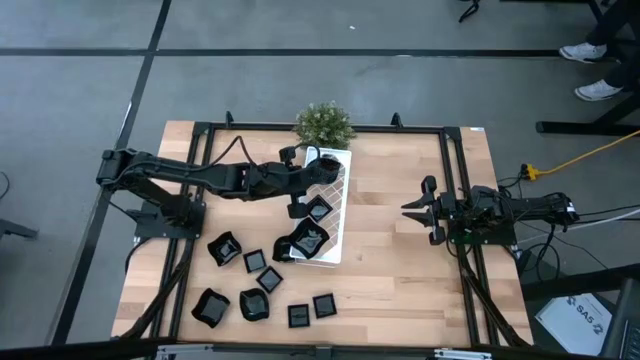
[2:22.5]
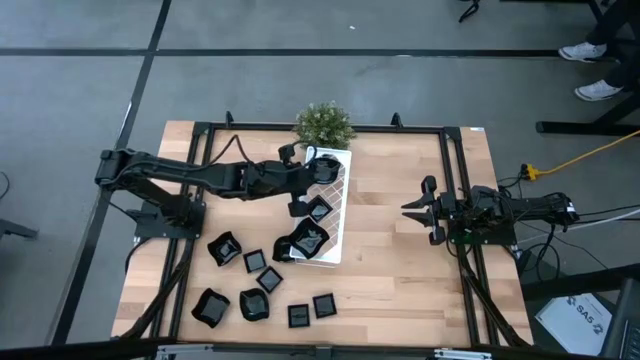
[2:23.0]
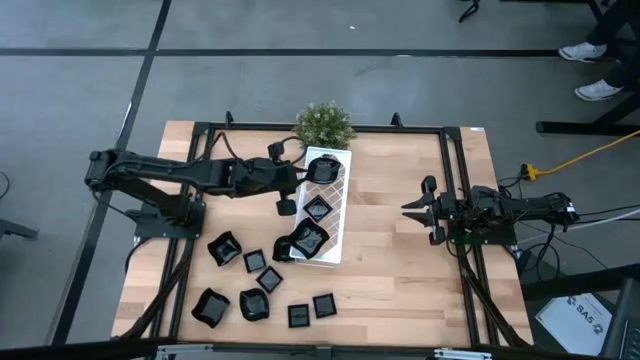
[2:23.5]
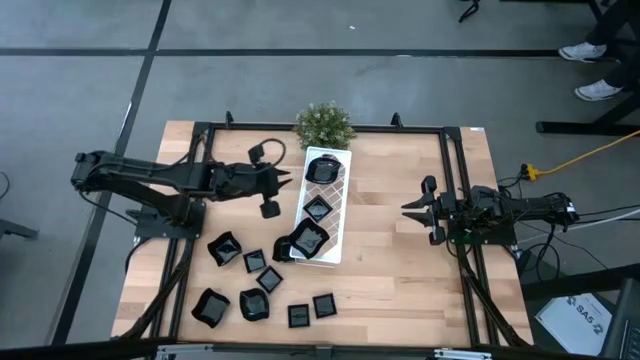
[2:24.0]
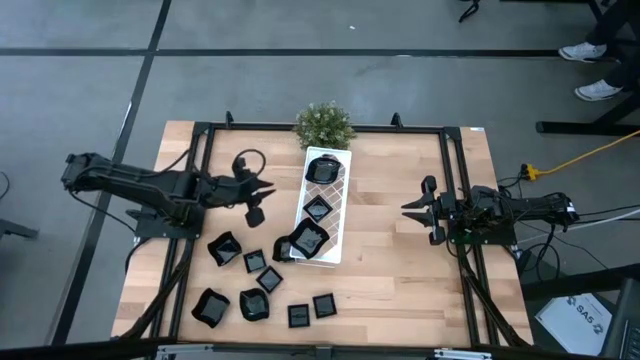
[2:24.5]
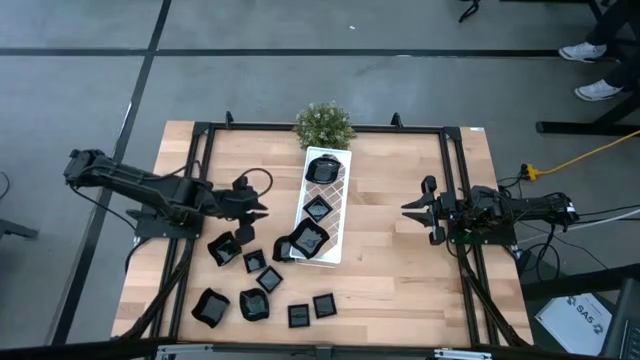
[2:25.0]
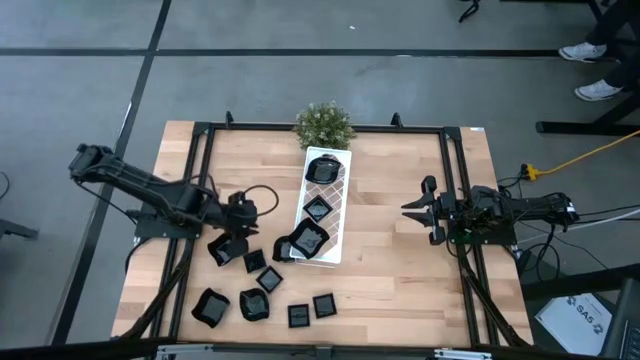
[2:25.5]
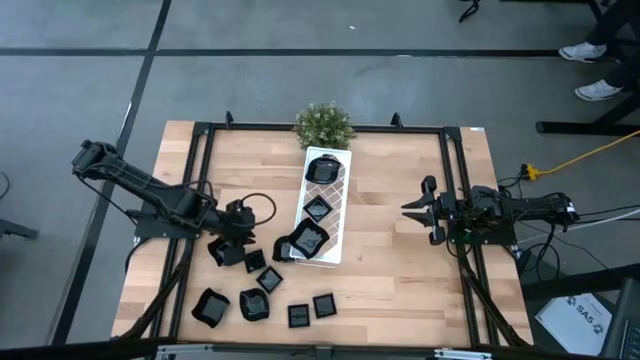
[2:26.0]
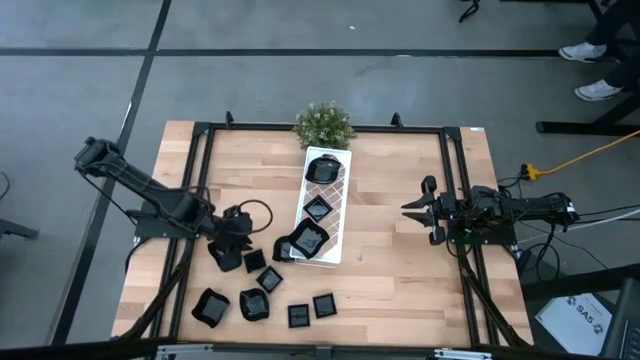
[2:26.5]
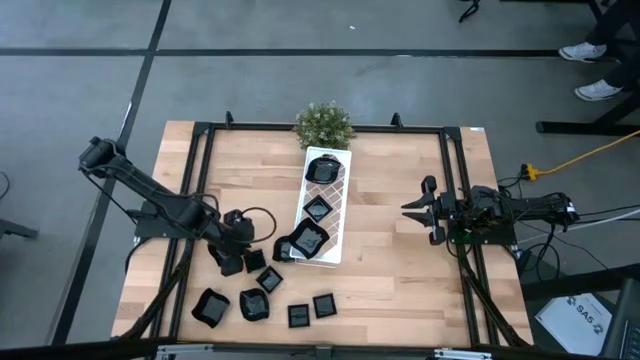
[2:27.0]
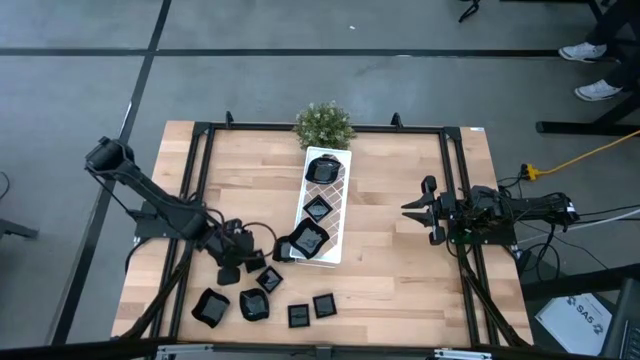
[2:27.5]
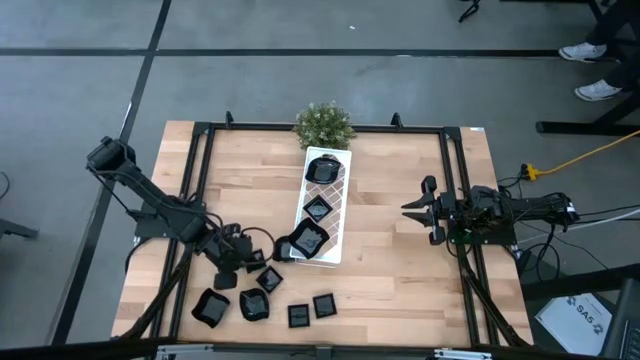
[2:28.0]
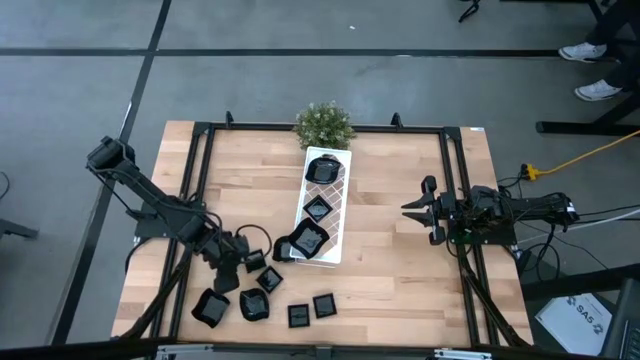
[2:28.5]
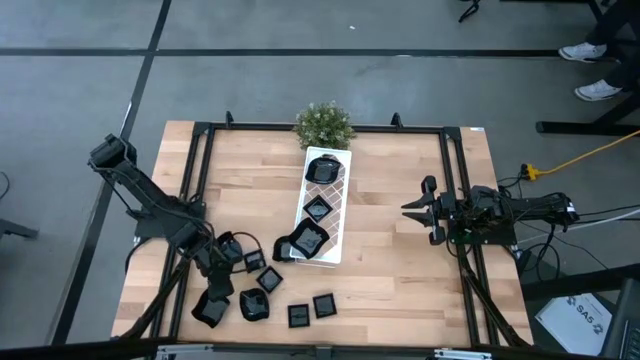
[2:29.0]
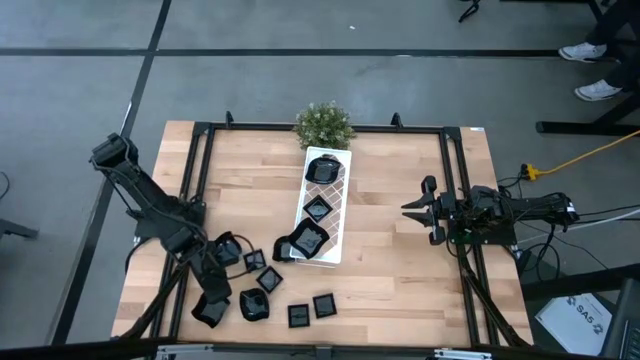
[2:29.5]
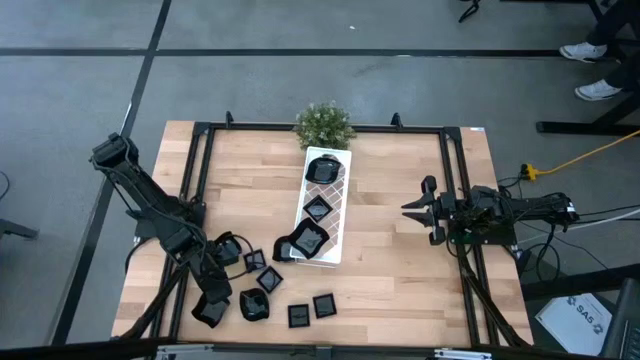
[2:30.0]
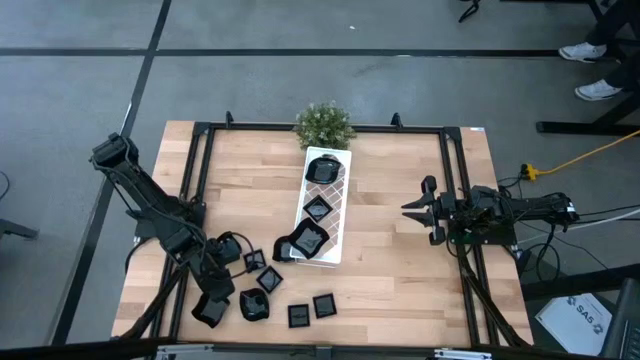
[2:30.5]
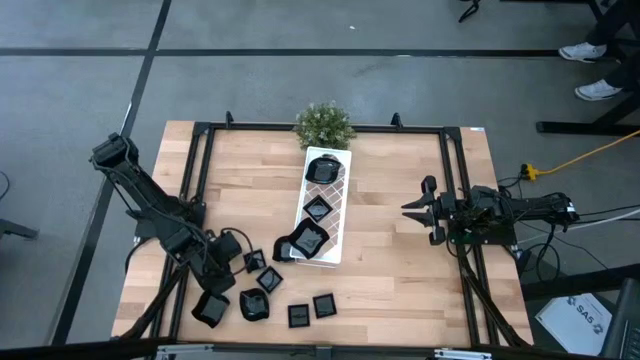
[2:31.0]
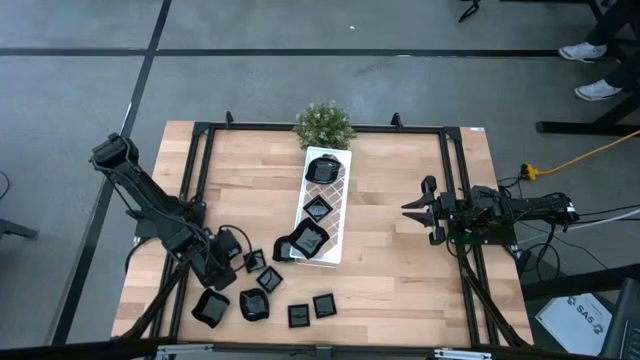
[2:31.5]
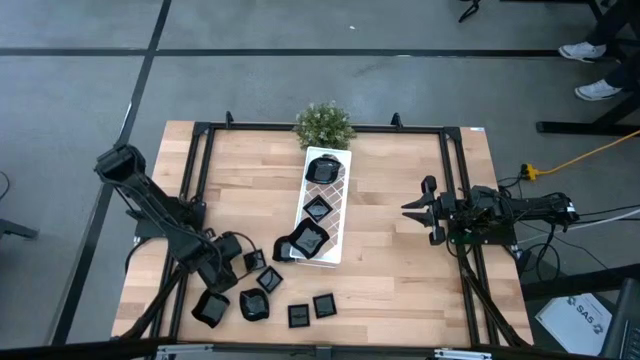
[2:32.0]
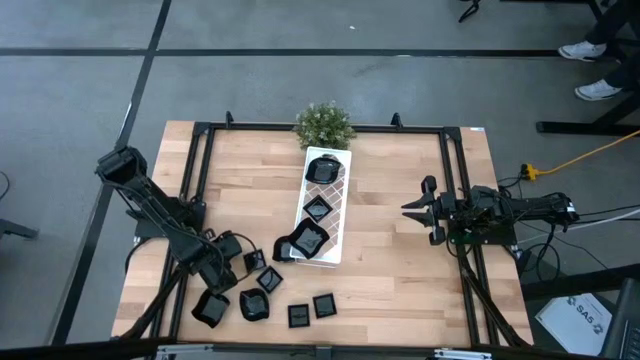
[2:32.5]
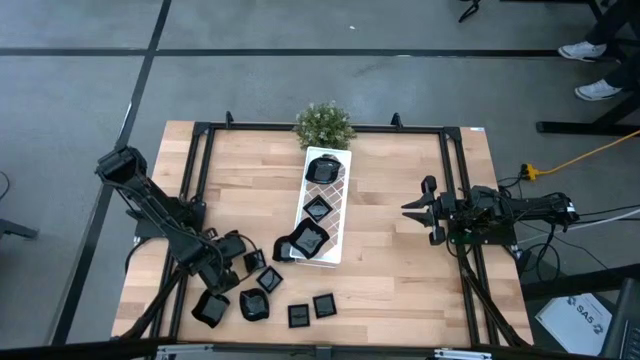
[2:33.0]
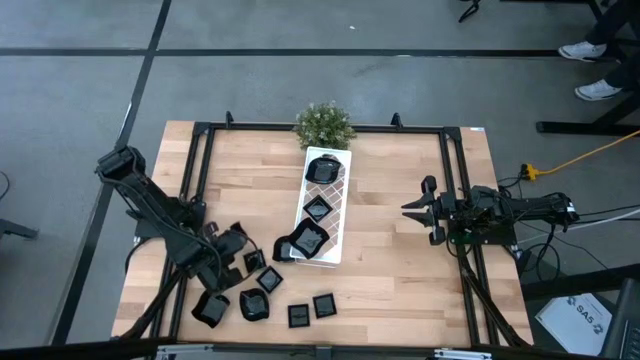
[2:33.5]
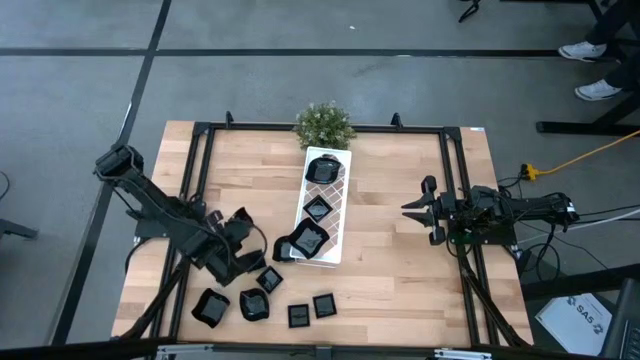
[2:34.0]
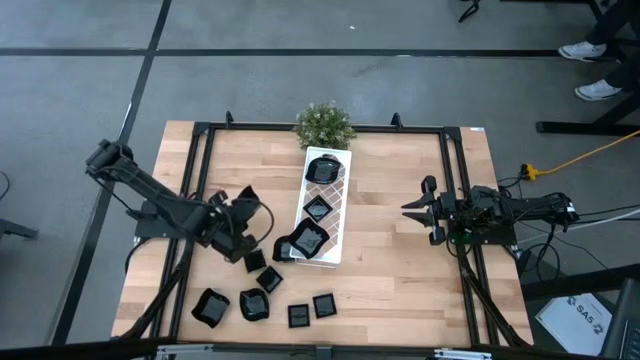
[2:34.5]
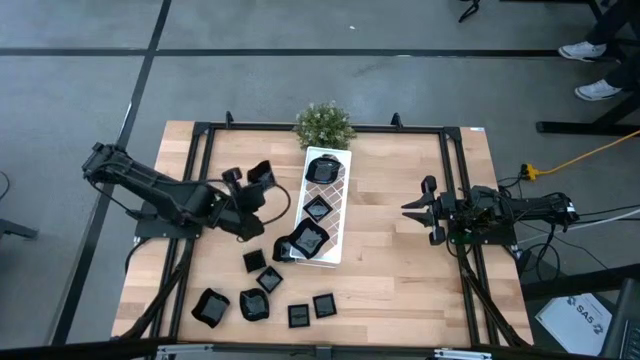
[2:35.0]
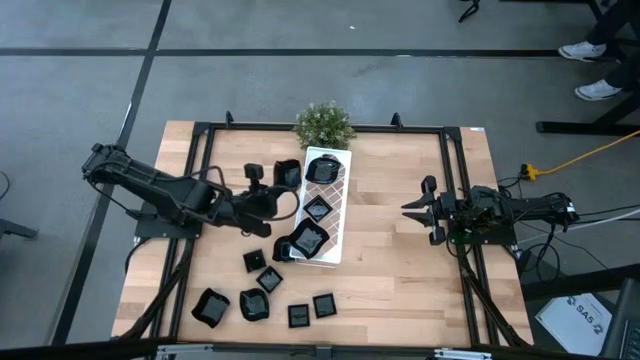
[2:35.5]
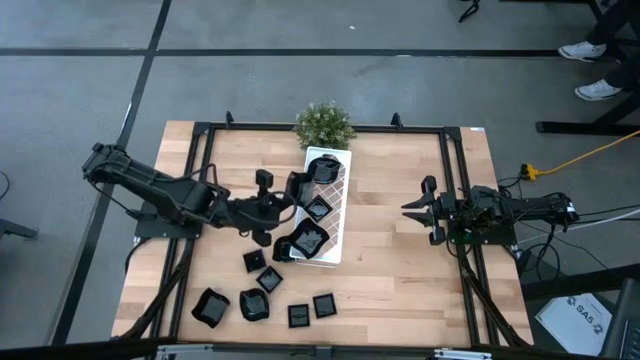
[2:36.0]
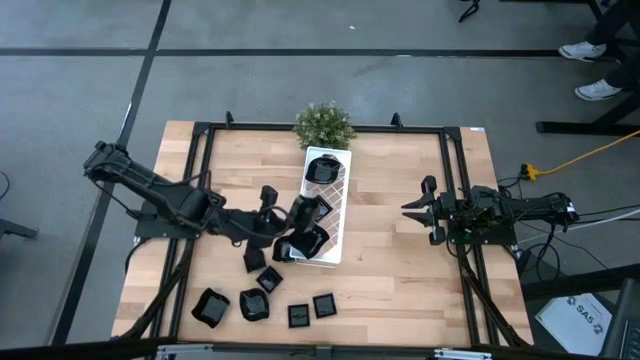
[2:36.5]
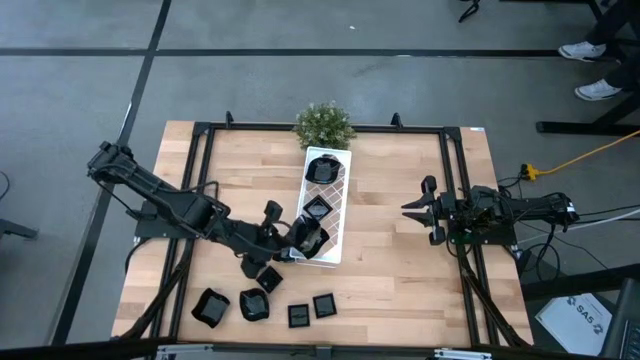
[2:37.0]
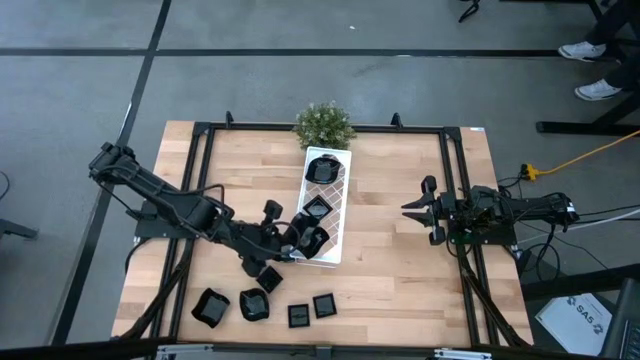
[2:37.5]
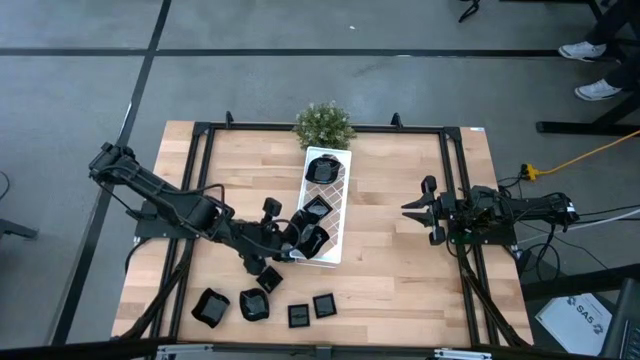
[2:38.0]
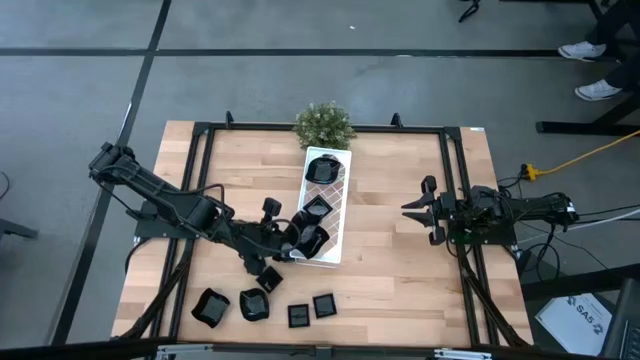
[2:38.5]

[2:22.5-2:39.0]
Task: Pick & Place Mini shaped plates
Stack the top distorted square plate on top of the distorted square plate on the shelf

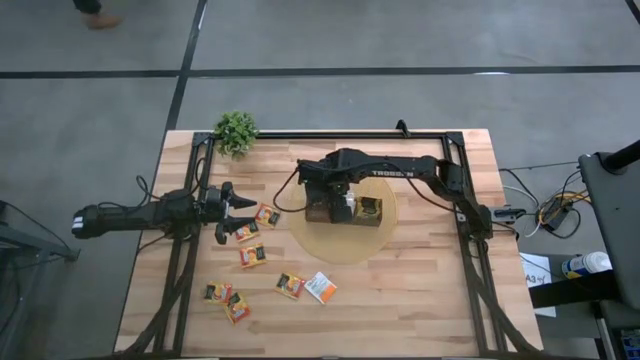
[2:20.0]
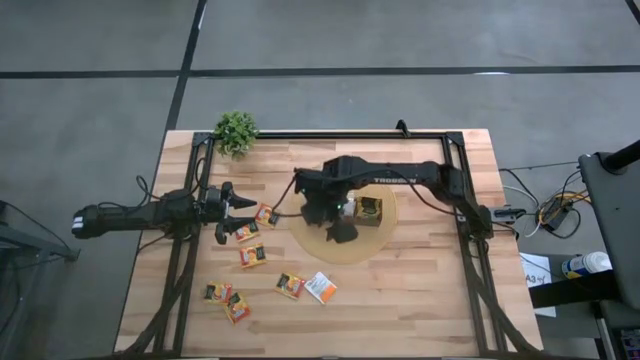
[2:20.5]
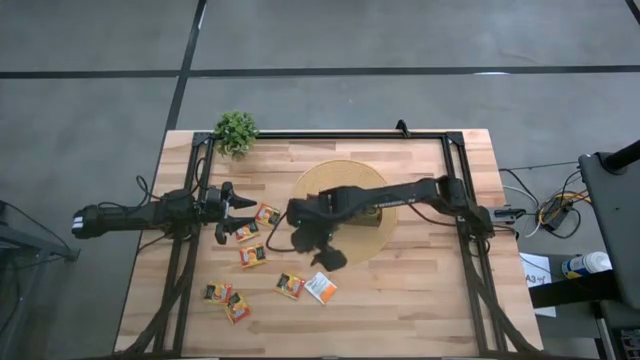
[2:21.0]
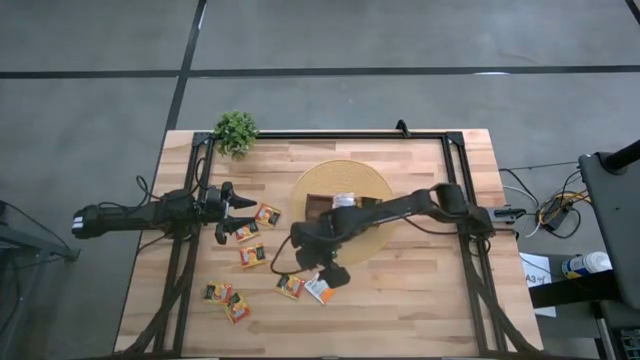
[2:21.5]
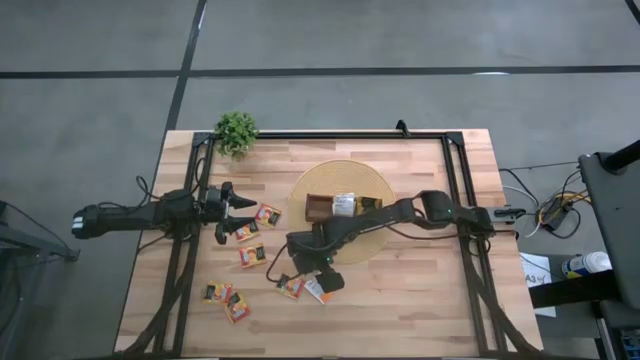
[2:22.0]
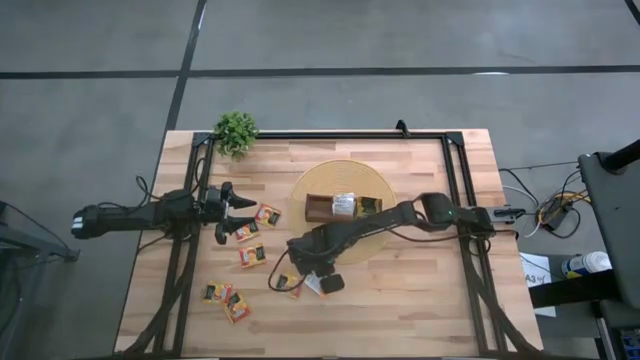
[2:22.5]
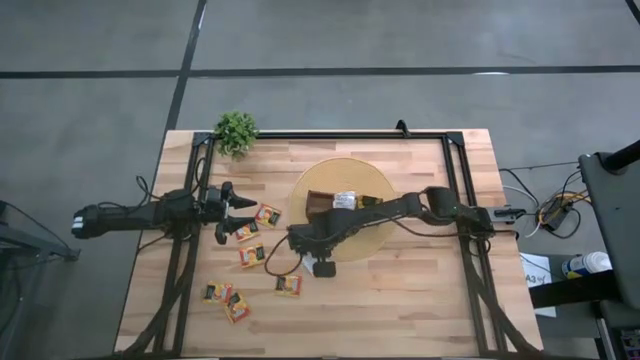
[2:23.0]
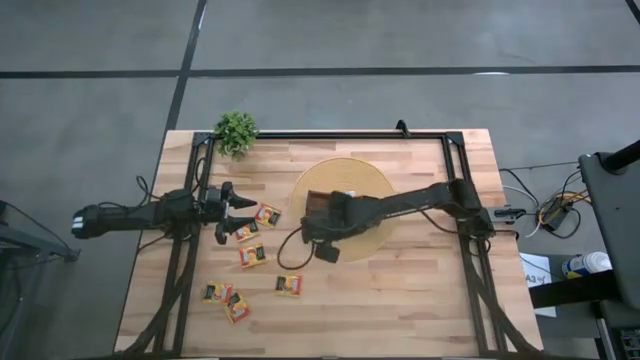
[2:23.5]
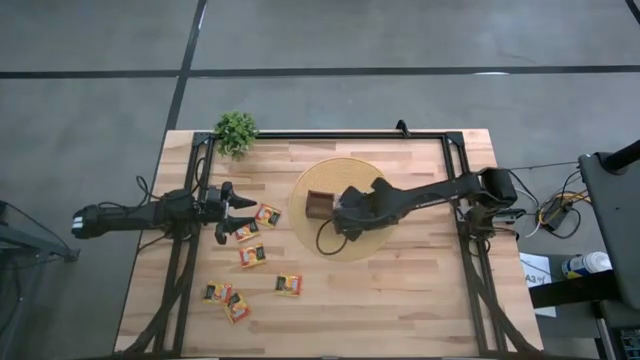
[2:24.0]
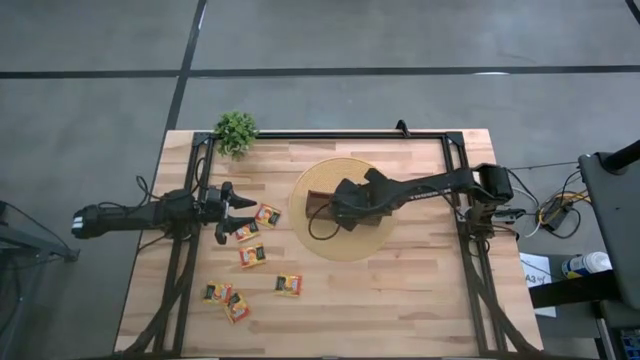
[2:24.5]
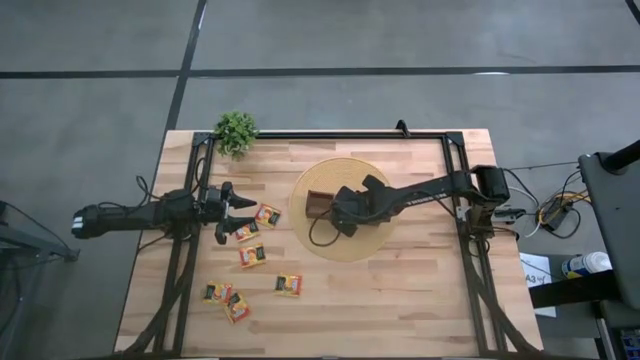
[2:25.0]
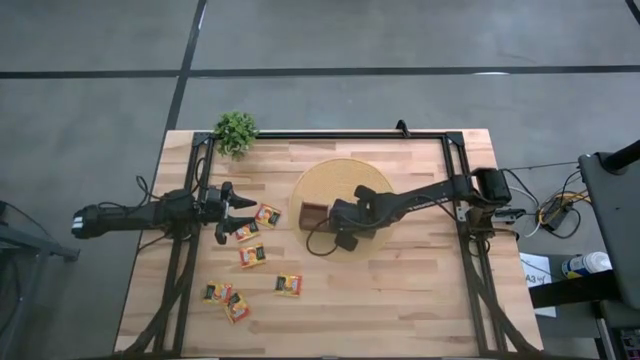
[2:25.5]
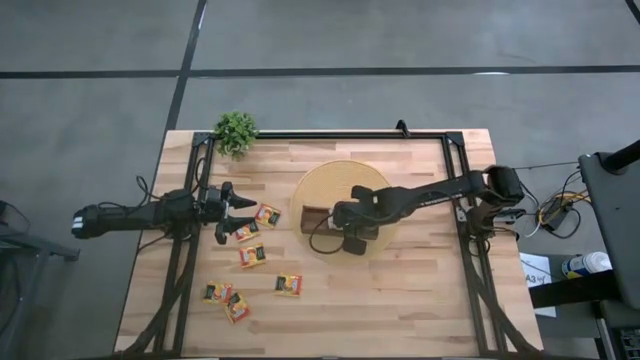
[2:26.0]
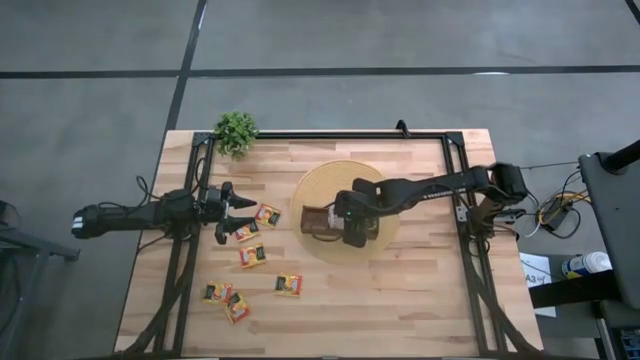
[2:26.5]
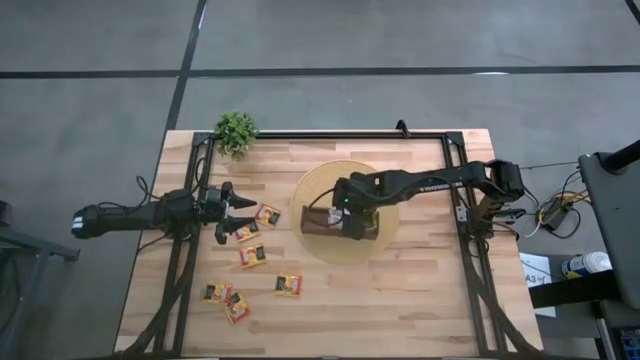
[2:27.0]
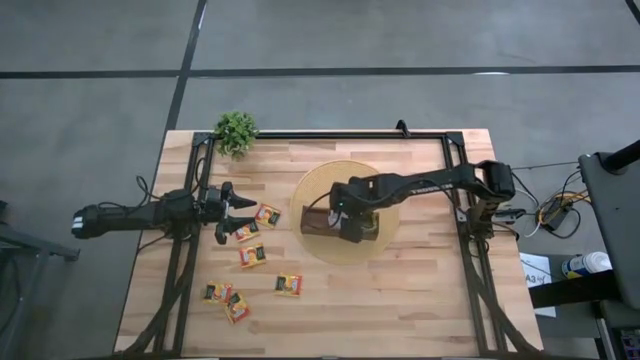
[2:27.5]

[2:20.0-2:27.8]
Task: Pick & Place Tea
Put the white tea bag into the middle section of the wooden organizer
